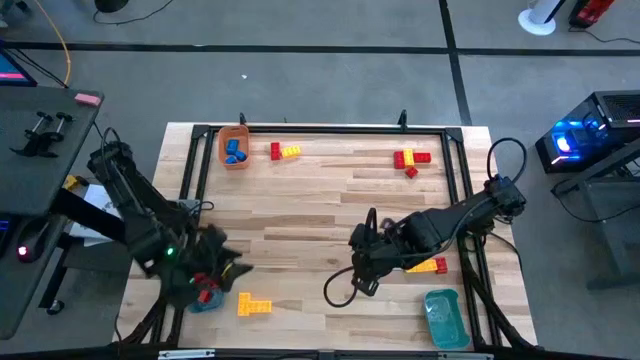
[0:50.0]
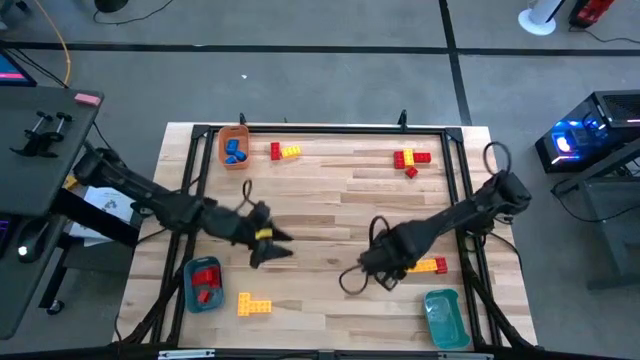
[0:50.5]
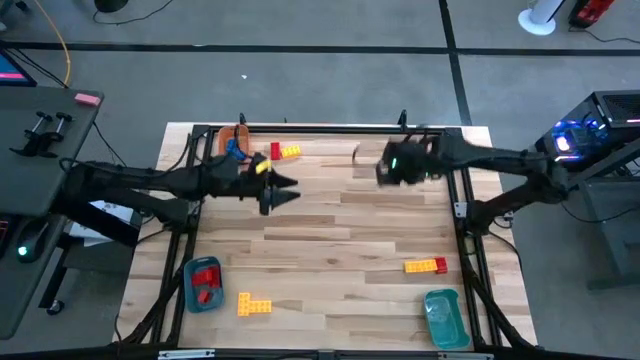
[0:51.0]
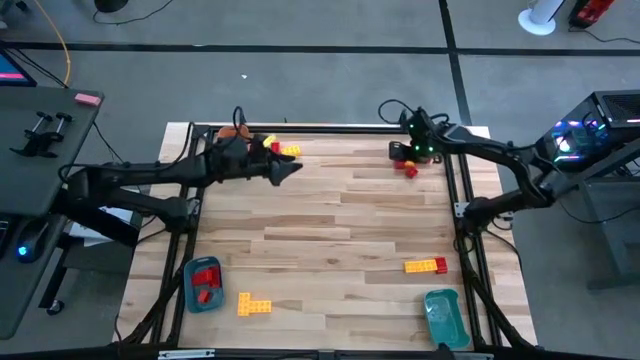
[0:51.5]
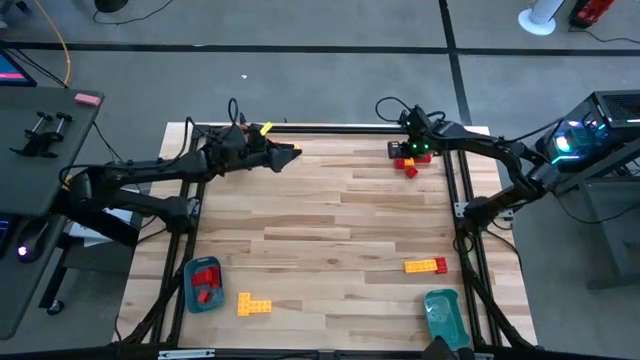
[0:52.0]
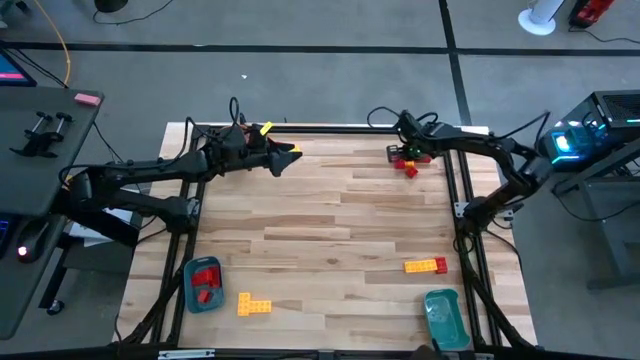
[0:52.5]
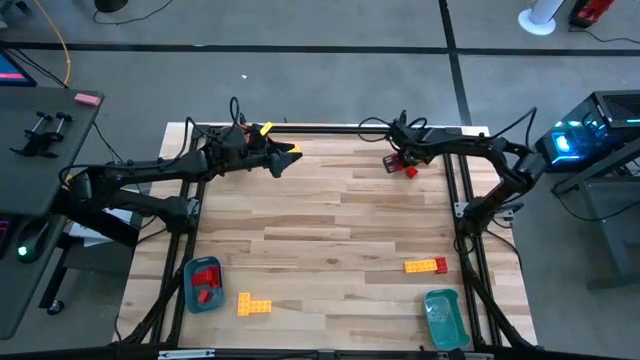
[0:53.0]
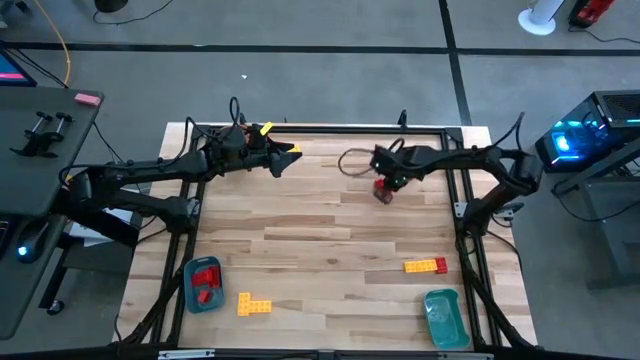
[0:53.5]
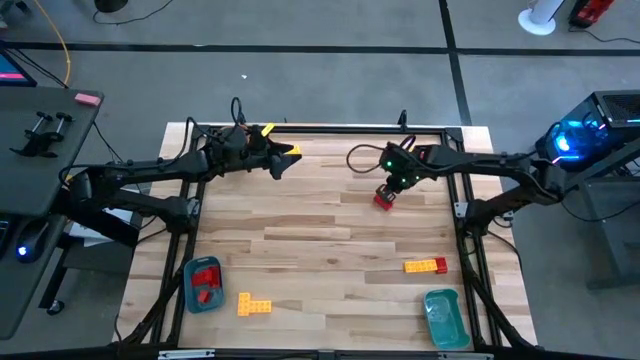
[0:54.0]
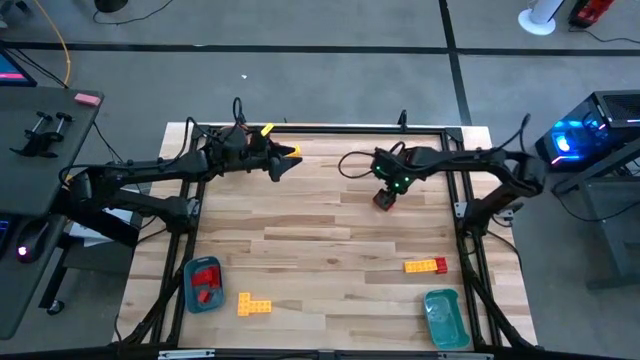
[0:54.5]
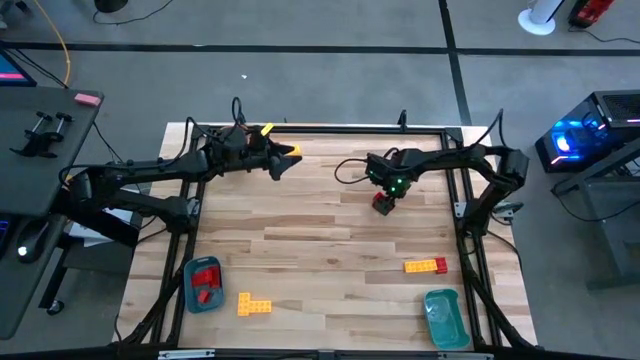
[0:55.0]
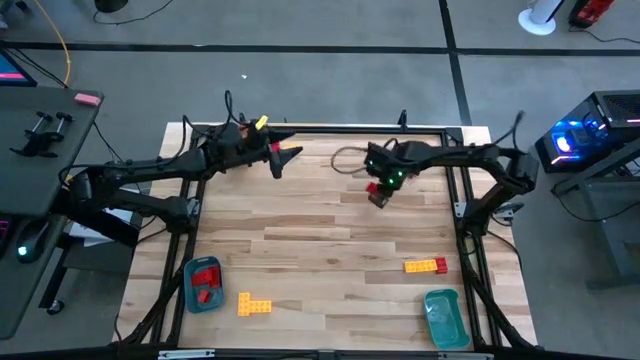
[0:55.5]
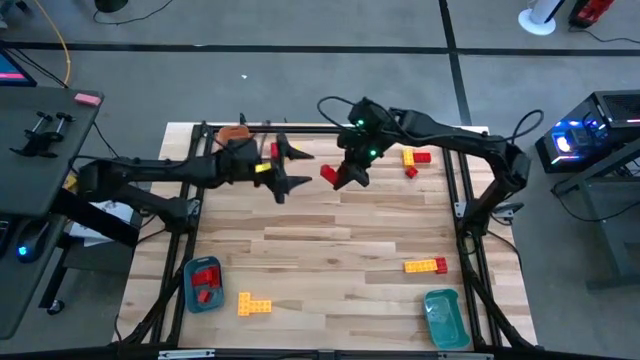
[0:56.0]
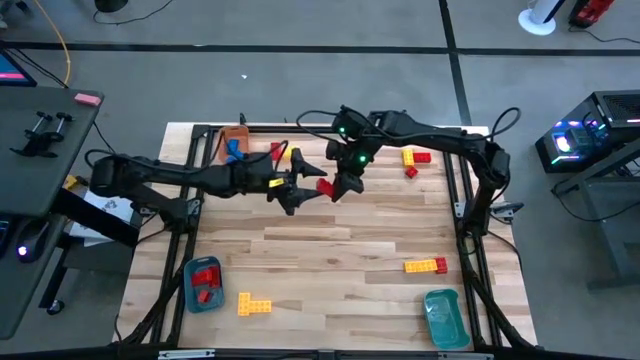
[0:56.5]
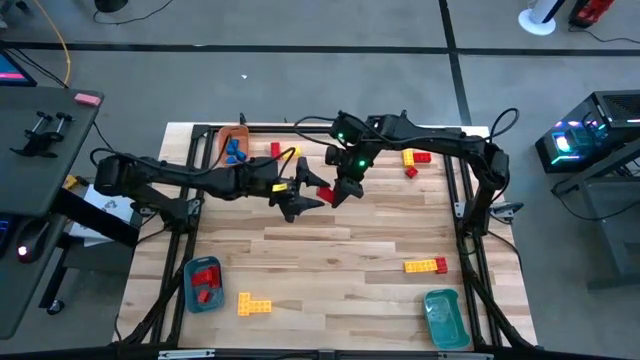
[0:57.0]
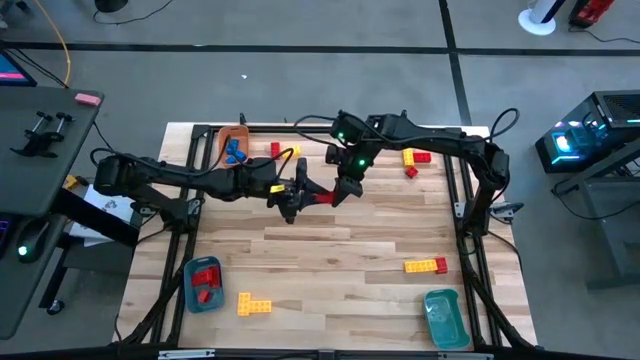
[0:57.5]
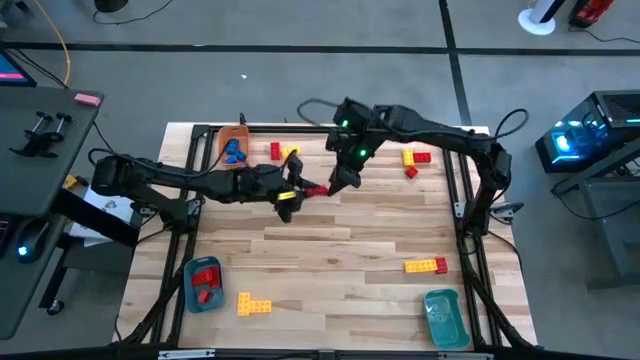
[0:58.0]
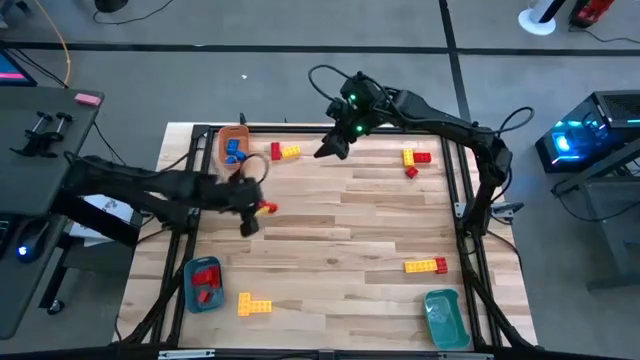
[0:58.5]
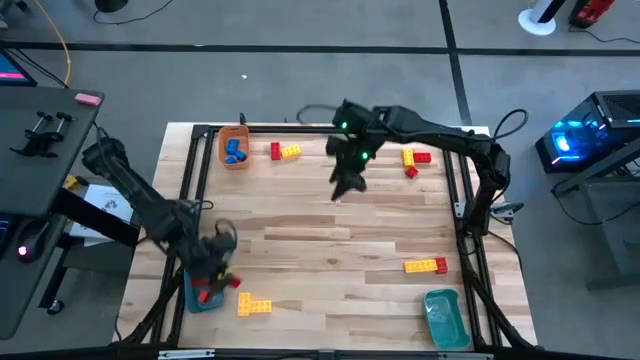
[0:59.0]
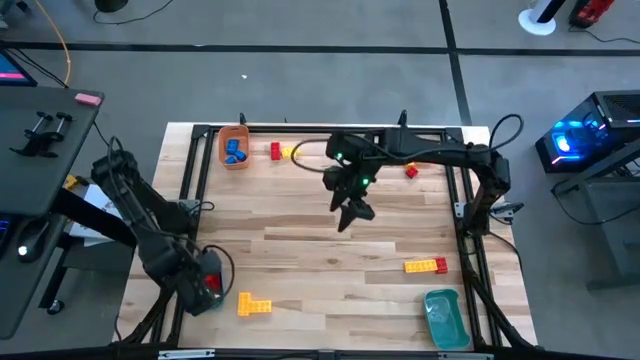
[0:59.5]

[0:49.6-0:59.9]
Task: Sort blocks
Put the red game piece into the bottom left blue bin

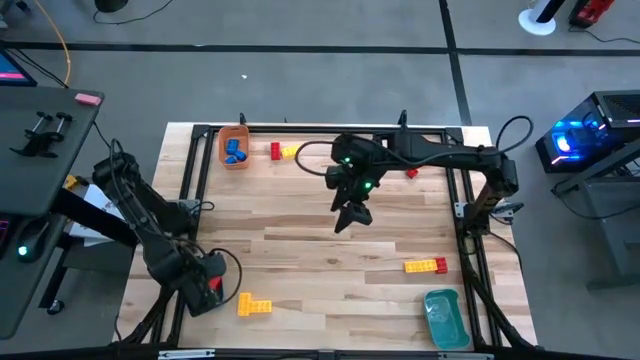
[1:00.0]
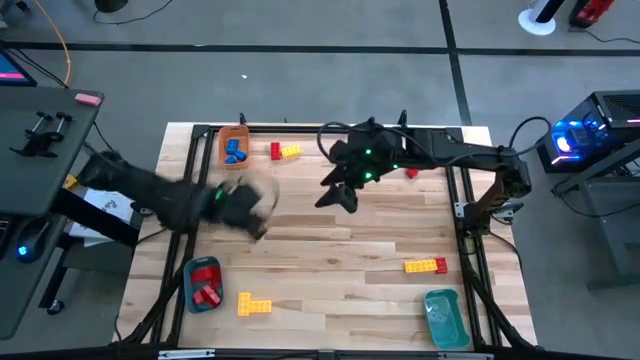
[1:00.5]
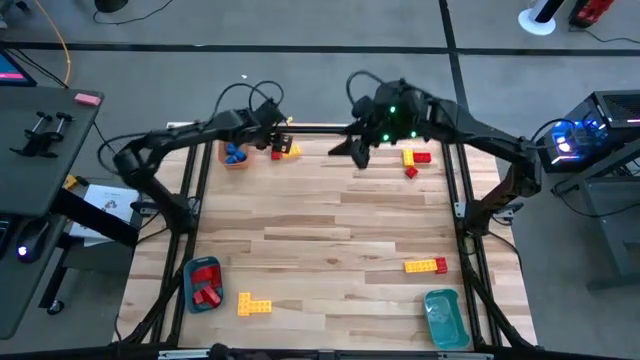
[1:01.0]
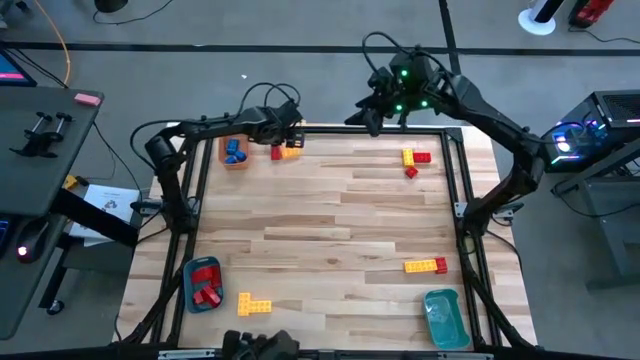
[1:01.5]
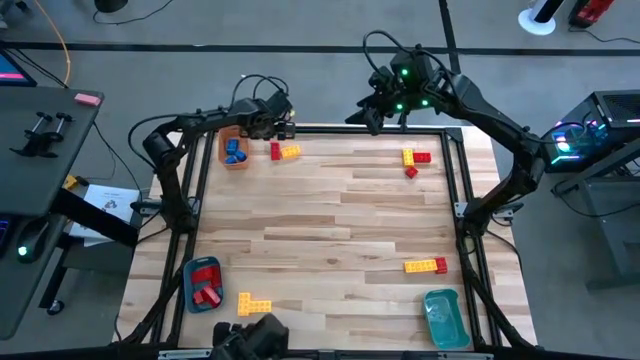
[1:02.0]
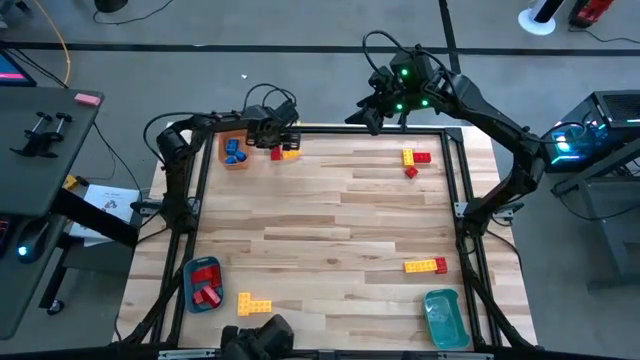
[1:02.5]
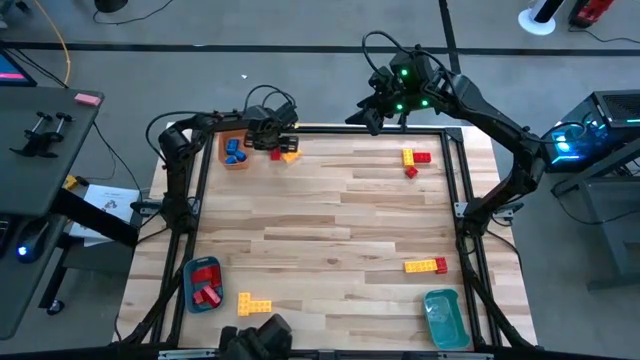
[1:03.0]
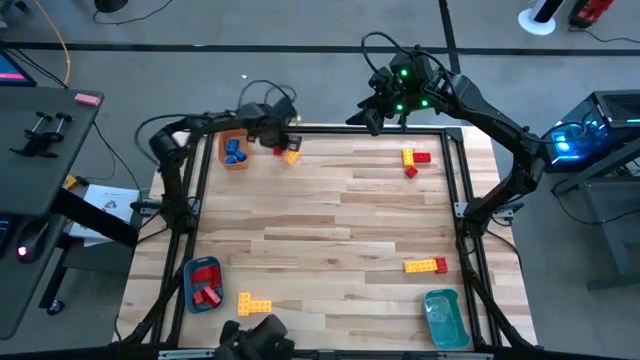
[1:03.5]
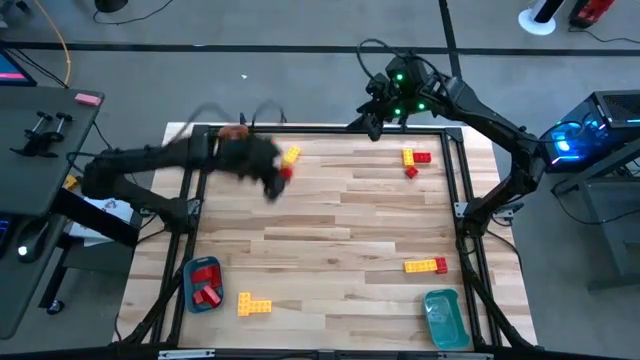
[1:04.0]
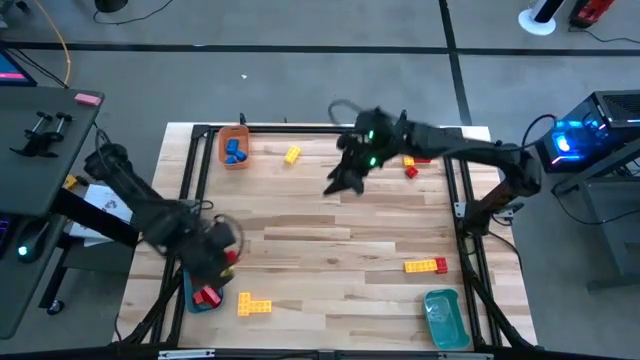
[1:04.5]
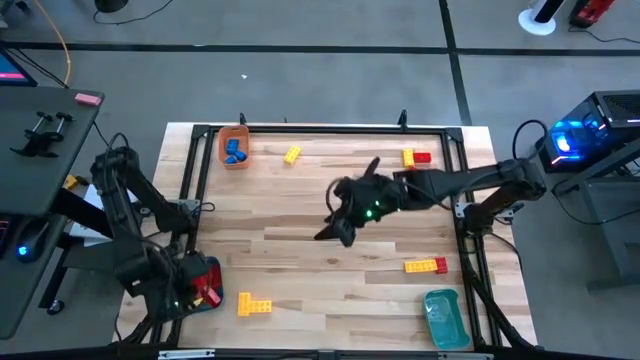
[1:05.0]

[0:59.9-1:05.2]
Put the red game piece into the bottom left blue bin

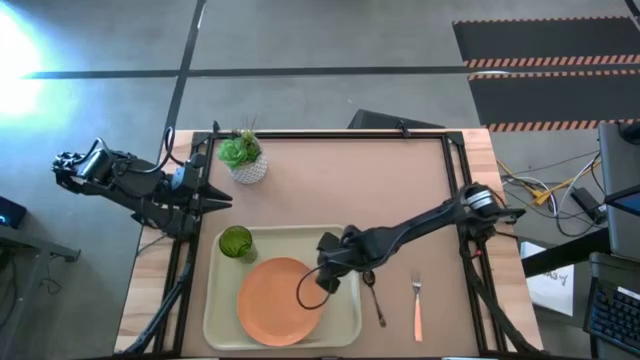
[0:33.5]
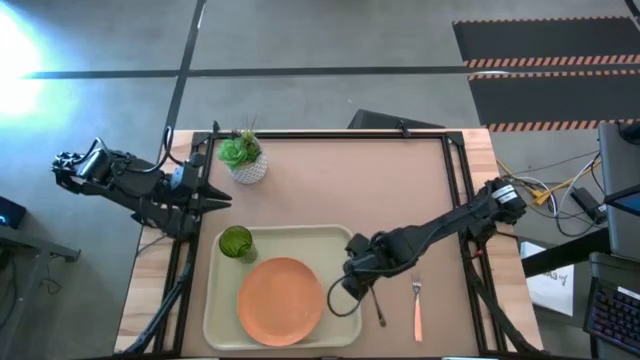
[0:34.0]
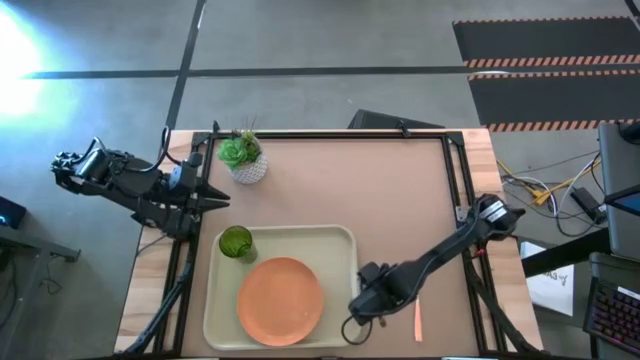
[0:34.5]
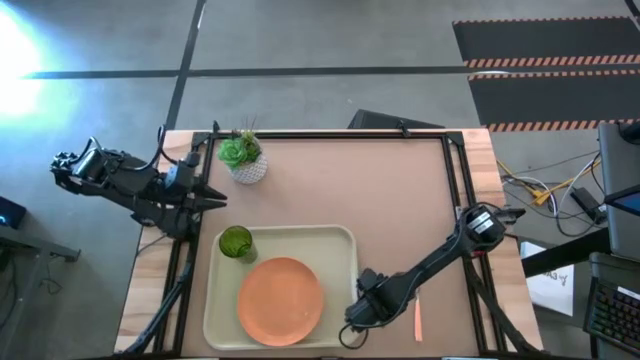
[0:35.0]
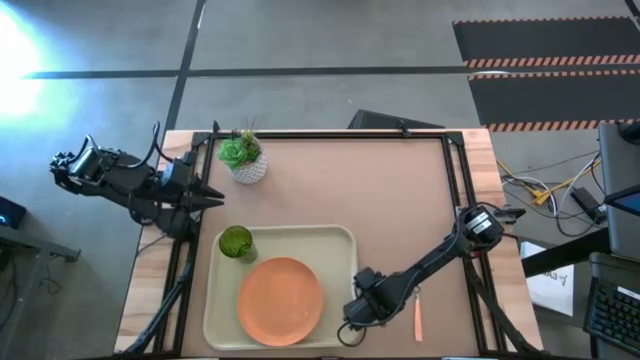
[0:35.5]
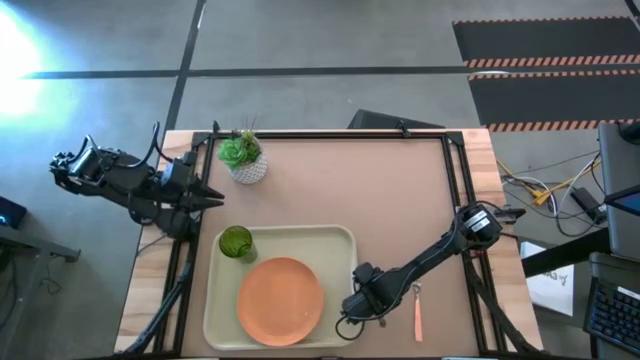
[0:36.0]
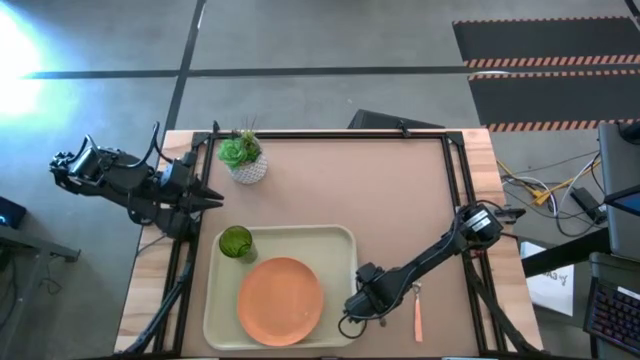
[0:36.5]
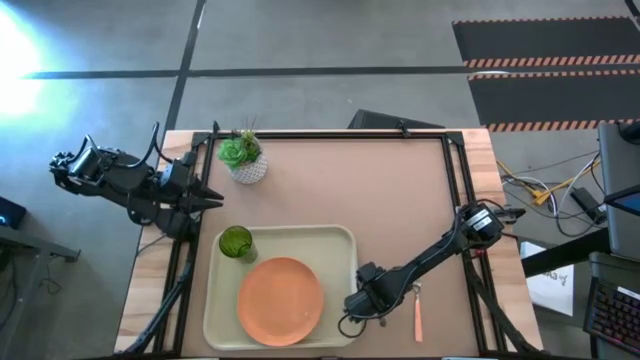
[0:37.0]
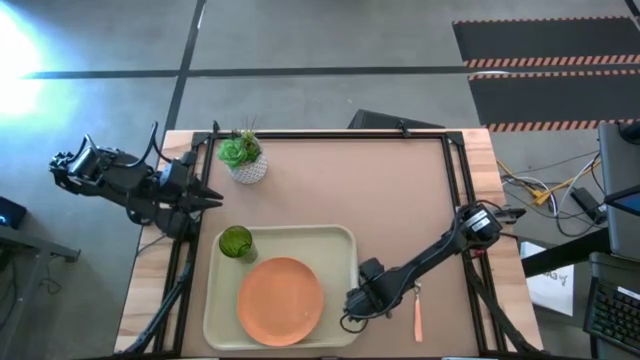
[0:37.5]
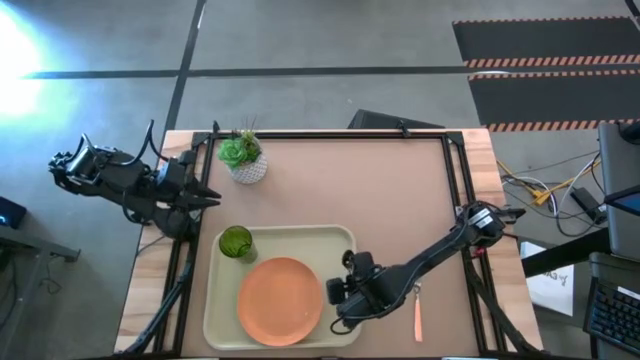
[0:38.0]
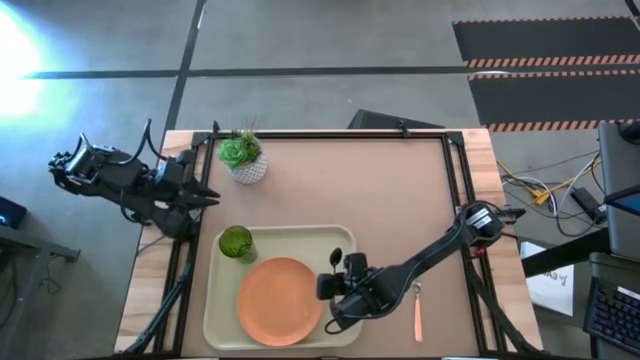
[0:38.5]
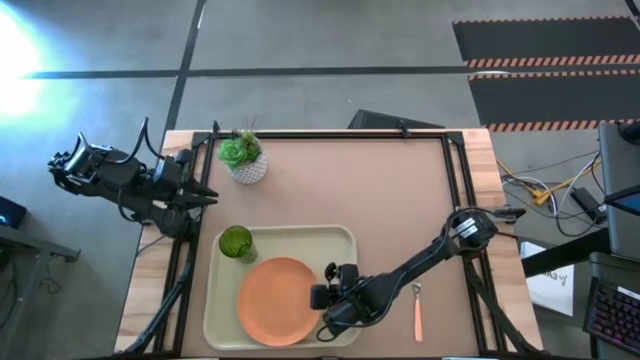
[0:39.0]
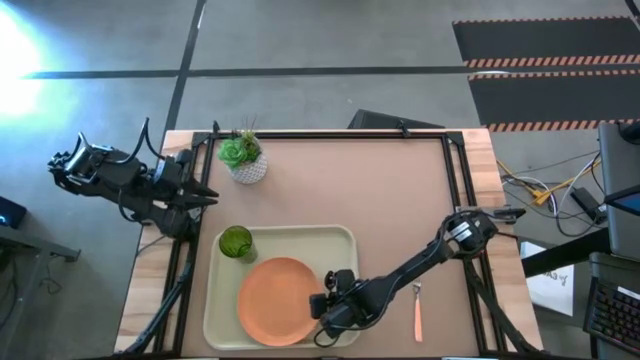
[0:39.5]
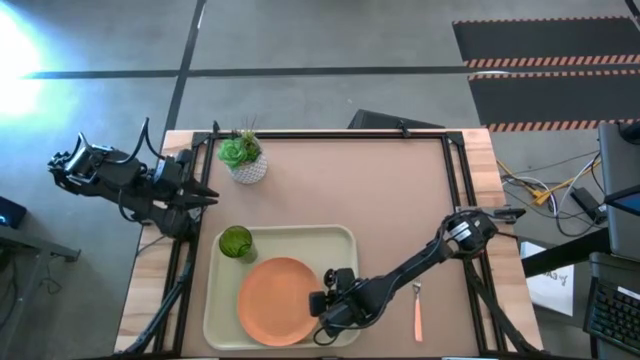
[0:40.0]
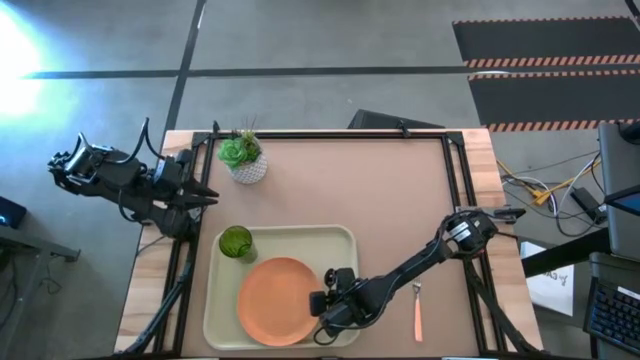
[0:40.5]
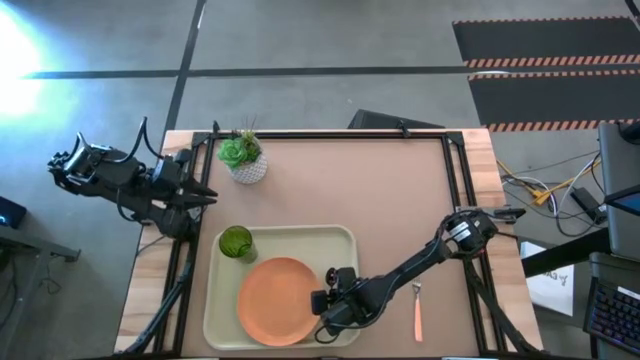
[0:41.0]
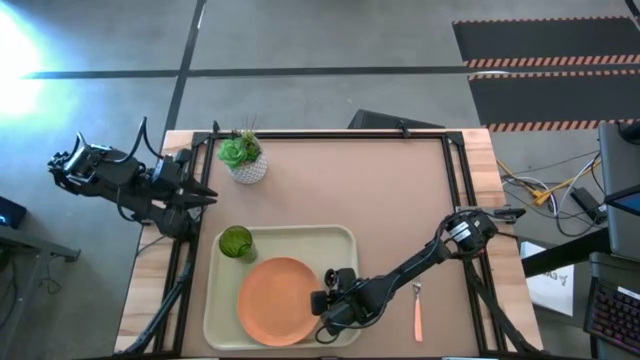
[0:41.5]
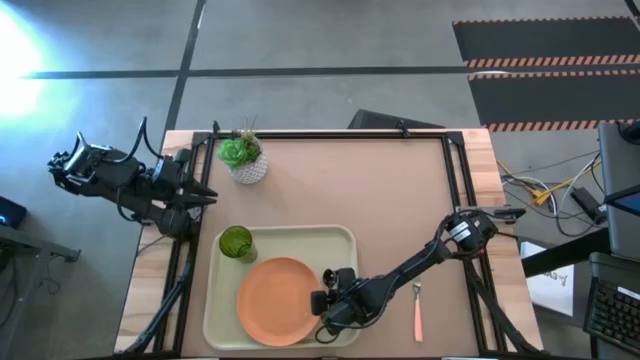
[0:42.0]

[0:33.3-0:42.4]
Task: Pick and place plate/cup/fork/spoon on tray
Put the black spoon on the white tray to the right of the orange plate
